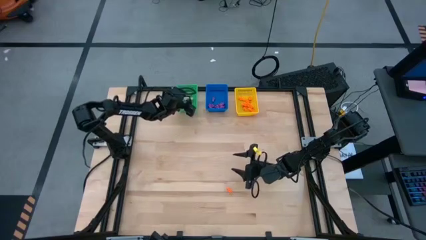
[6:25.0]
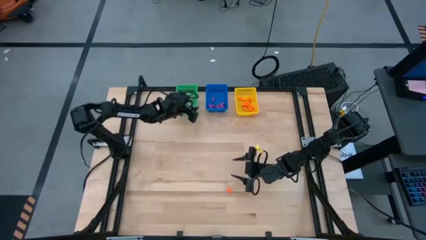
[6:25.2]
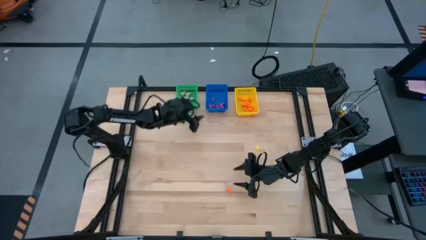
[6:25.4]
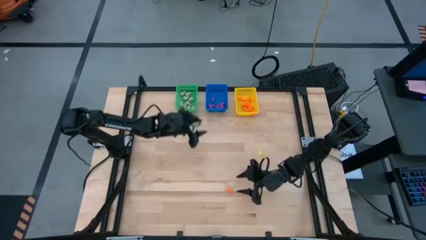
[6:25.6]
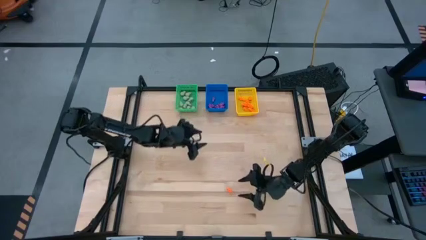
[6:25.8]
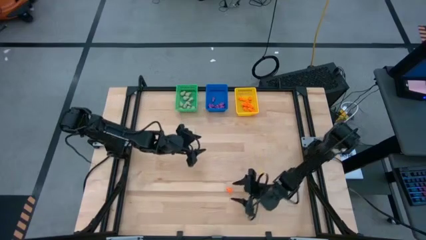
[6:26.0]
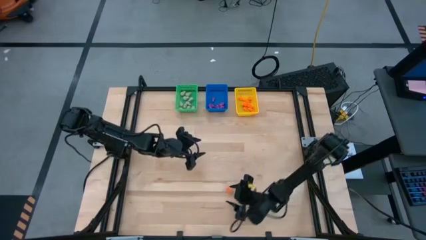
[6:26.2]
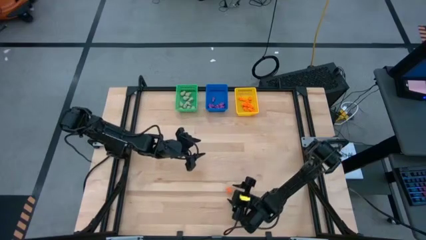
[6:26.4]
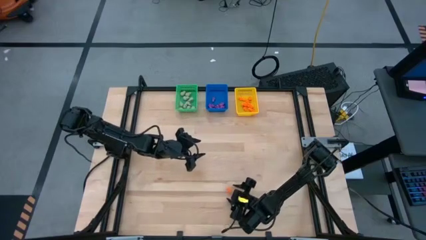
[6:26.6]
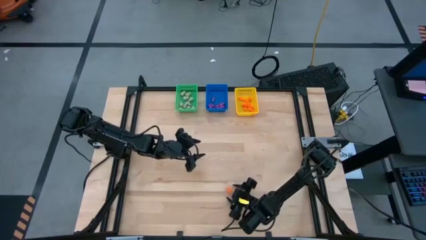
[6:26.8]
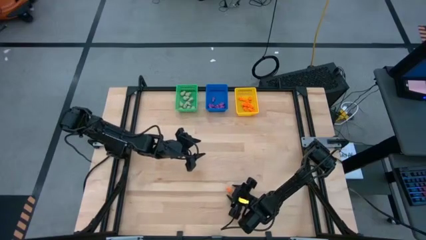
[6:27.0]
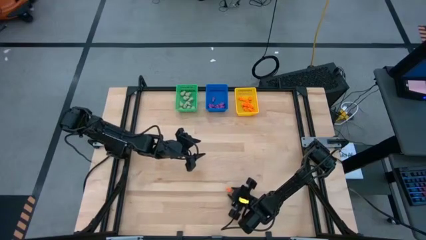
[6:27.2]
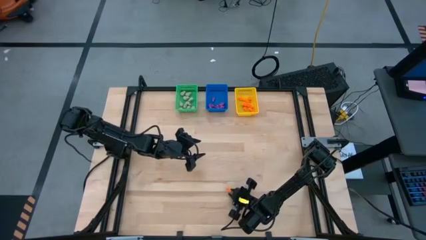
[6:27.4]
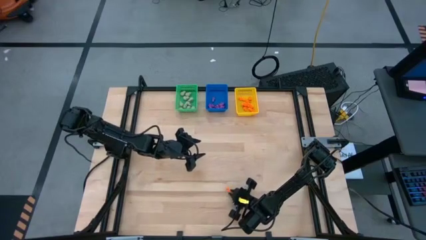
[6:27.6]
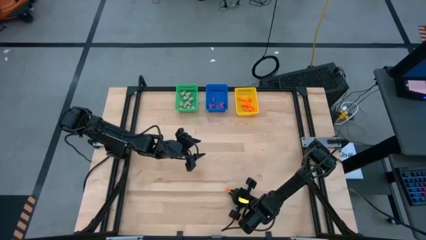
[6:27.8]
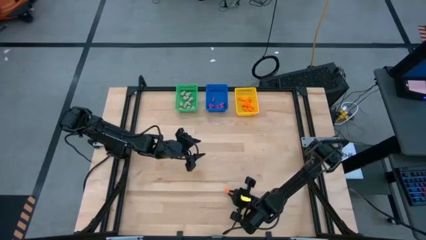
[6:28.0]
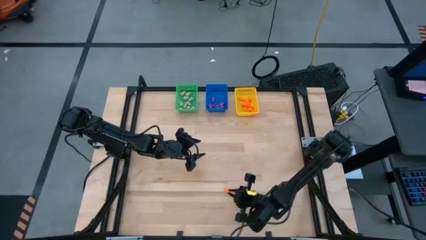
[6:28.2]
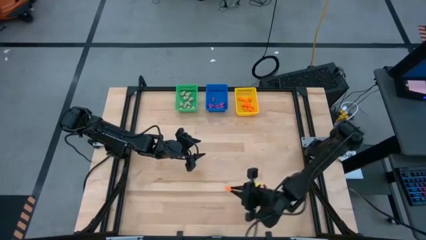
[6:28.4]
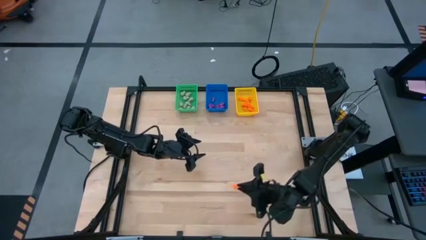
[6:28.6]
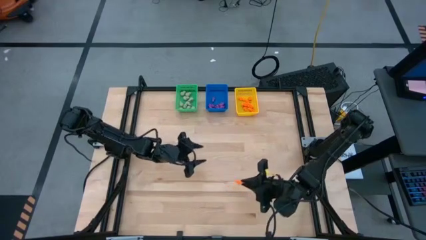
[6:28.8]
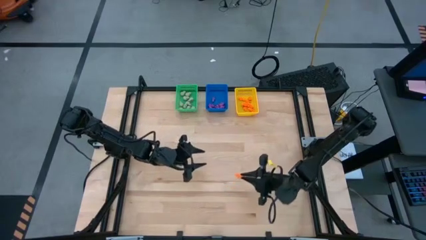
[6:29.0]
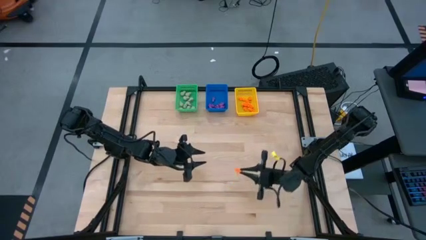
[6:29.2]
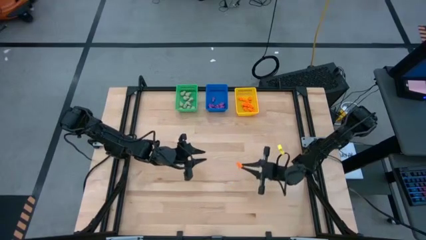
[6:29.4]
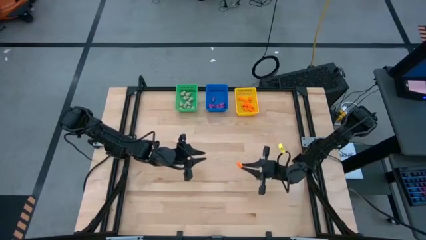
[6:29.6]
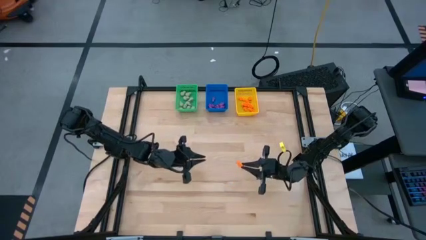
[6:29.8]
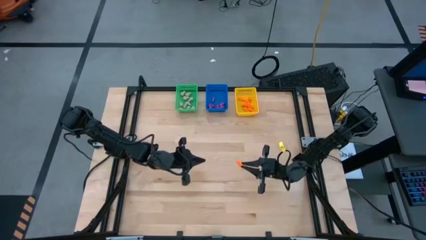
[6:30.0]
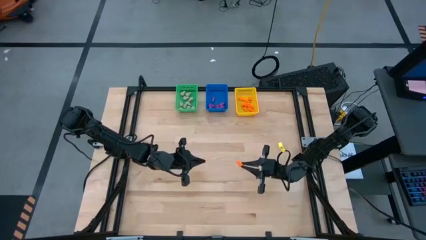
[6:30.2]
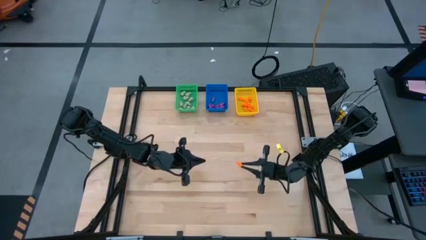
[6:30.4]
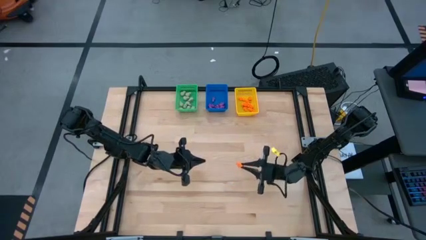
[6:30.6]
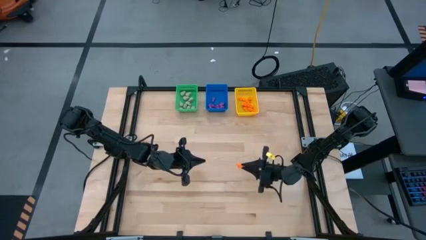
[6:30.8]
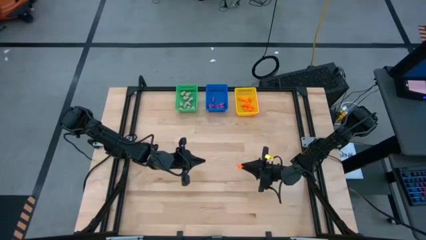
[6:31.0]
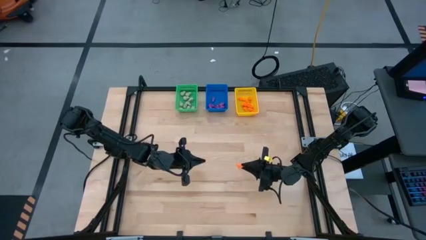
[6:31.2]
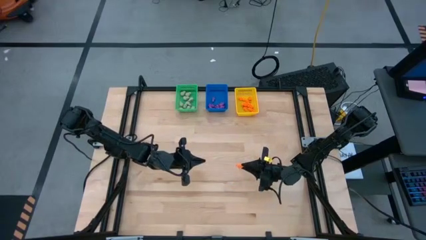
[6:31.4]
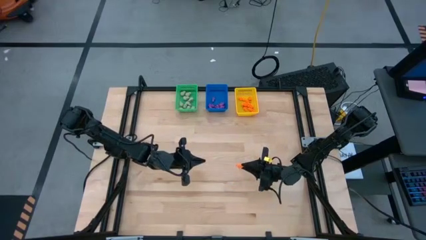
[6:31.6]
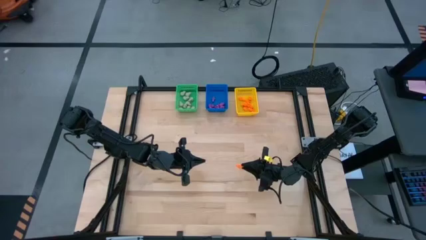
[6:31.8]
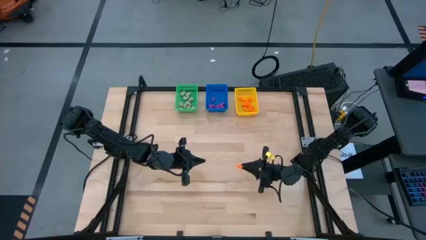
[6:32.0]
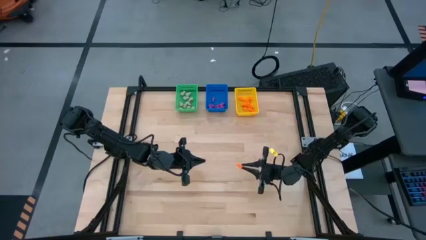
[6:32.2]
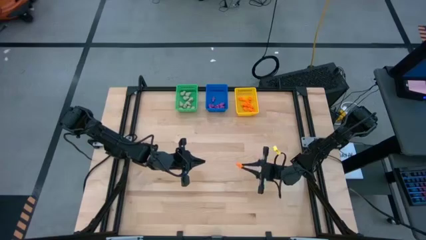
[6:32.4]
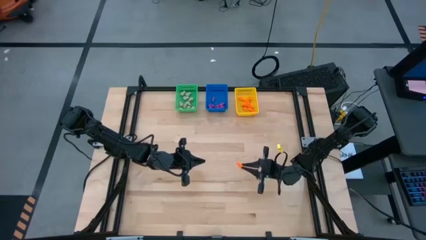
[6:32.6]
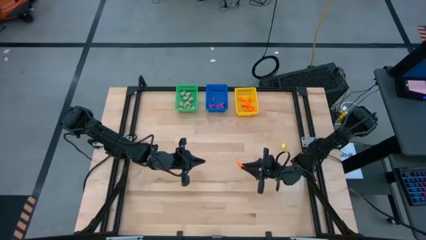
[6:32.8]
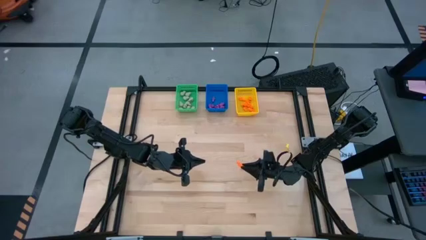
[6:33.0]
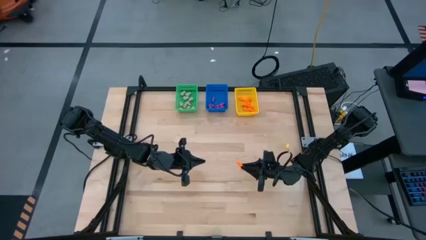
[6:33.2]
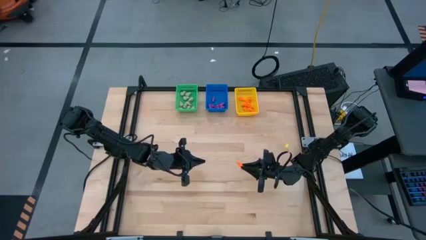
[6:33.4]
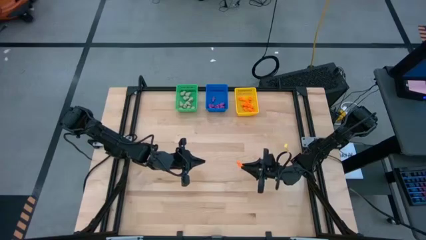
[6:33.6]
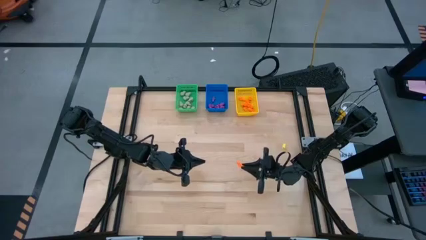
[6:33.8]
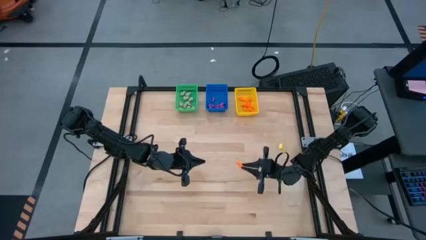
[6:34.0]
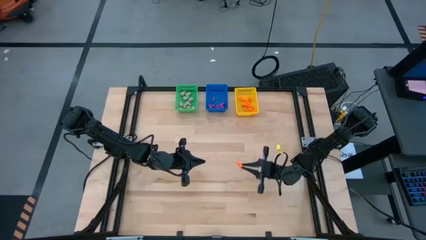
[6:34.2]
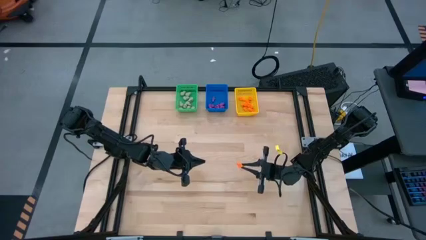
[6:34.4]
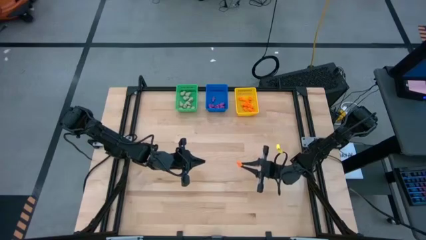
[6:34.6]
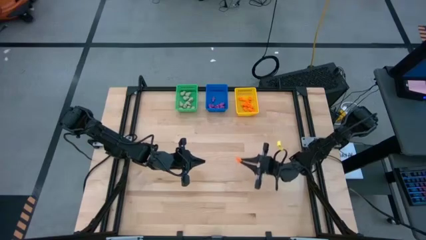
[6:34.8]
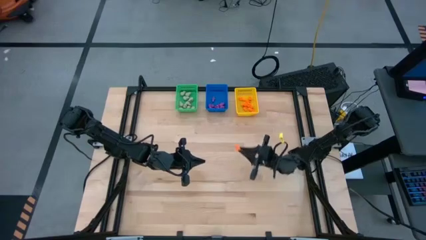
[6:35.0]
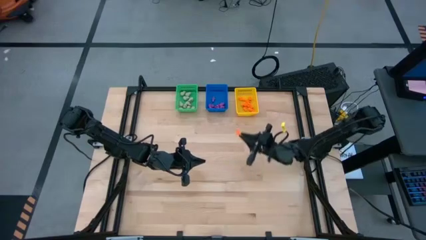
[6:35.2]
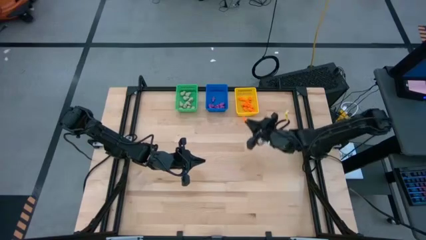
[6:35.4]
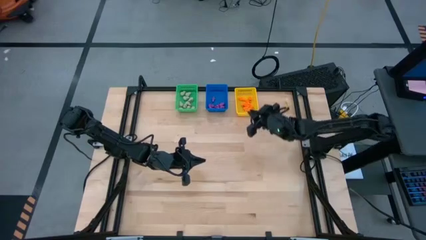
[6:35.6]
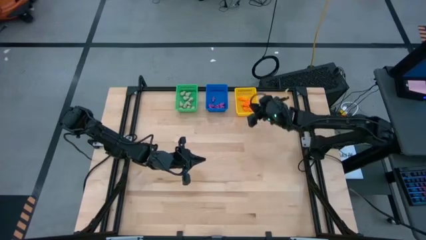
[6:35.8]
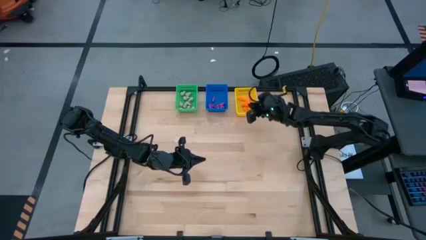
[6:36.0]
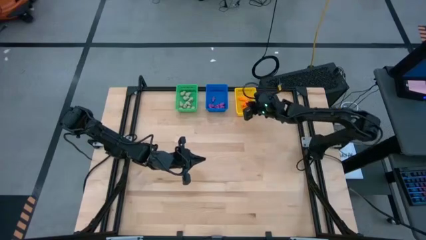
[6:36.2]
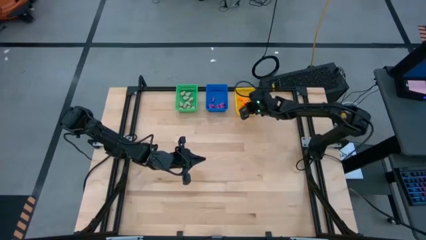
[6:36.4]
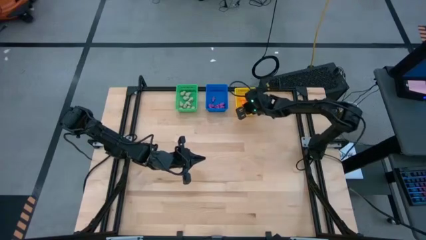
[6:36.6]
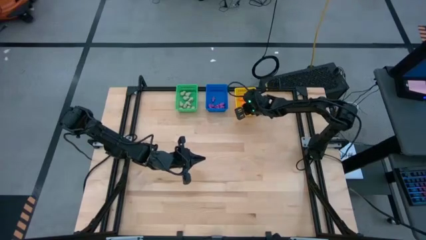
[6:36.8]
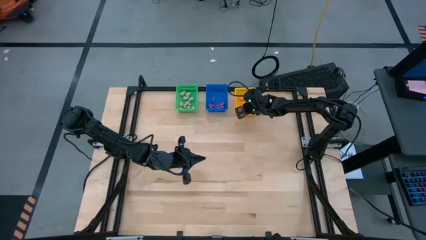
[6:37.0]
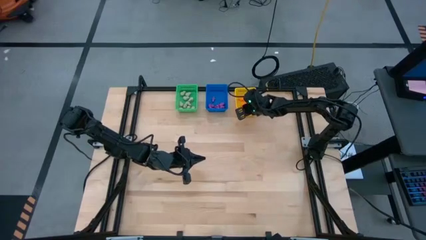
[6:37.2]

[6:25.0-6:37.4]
Task: Sort Halloween decoration
Put the orange skeleton toy into the yellow bin

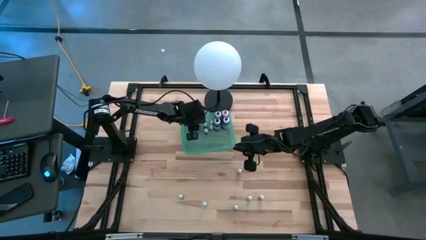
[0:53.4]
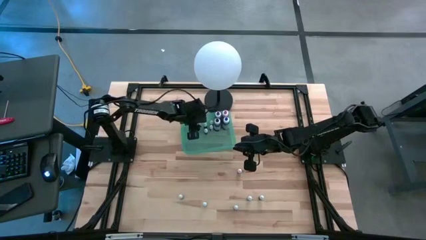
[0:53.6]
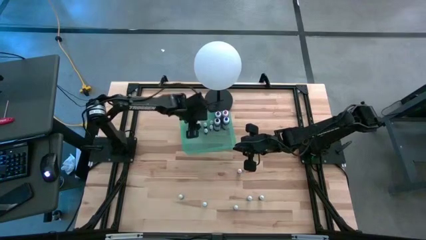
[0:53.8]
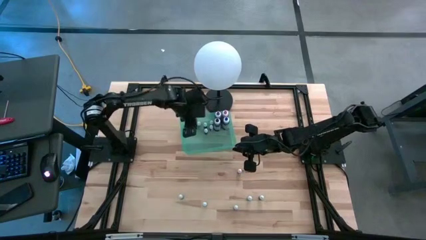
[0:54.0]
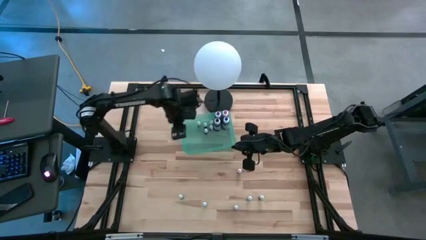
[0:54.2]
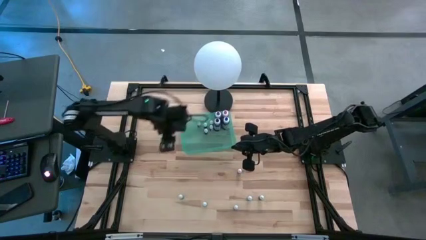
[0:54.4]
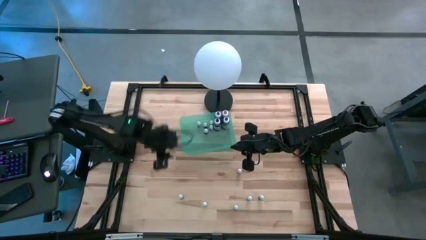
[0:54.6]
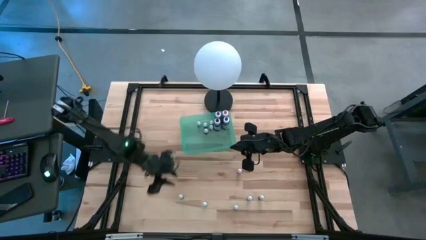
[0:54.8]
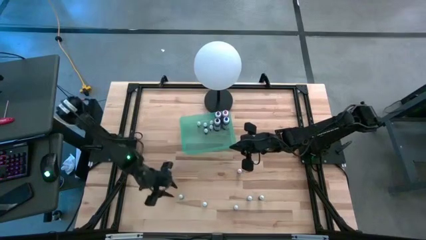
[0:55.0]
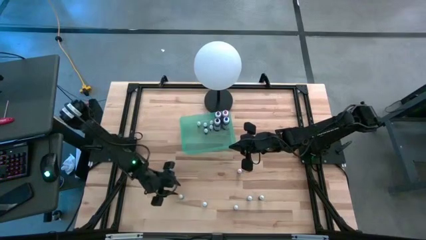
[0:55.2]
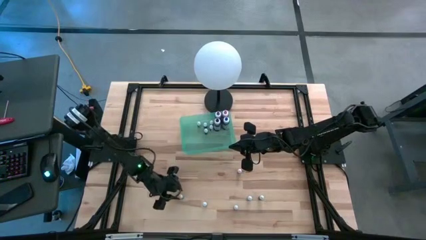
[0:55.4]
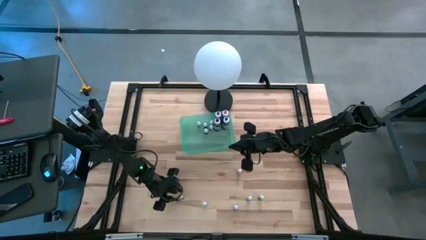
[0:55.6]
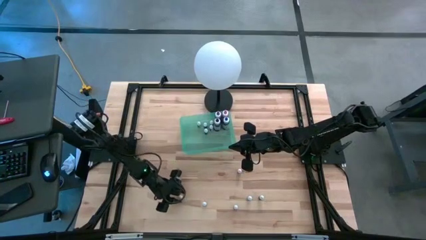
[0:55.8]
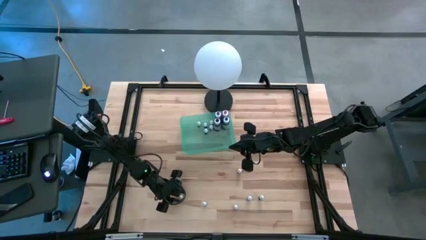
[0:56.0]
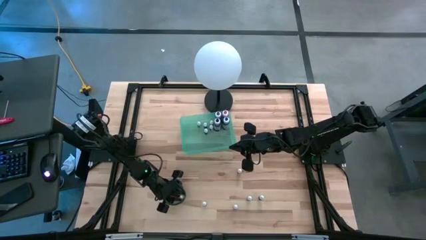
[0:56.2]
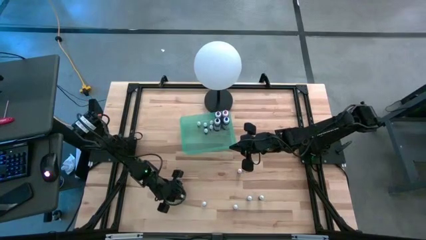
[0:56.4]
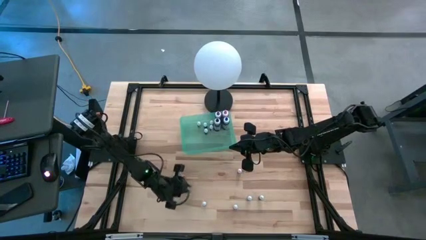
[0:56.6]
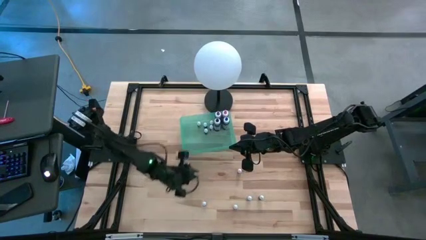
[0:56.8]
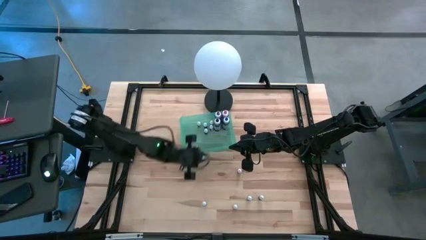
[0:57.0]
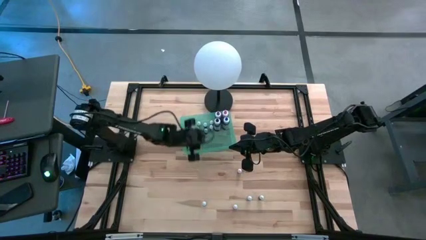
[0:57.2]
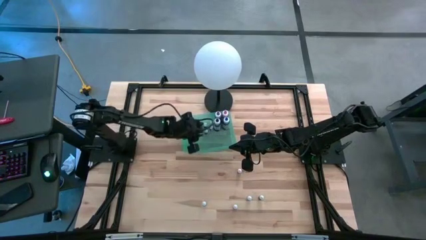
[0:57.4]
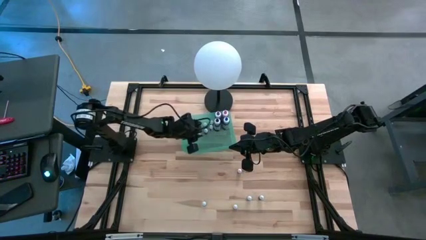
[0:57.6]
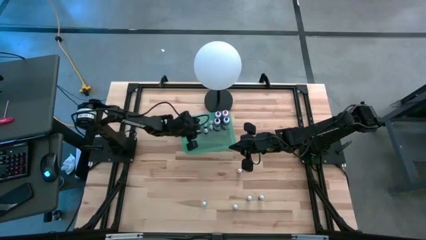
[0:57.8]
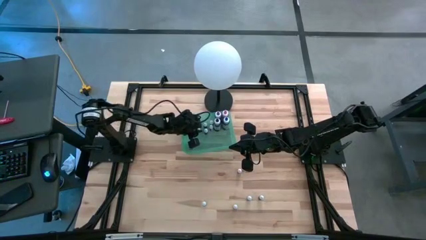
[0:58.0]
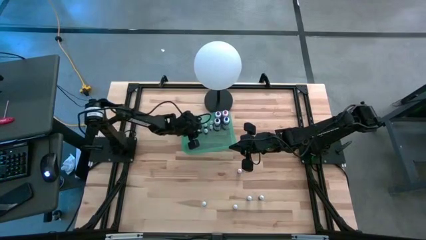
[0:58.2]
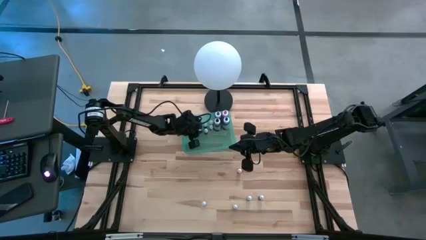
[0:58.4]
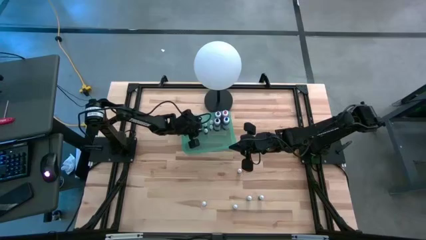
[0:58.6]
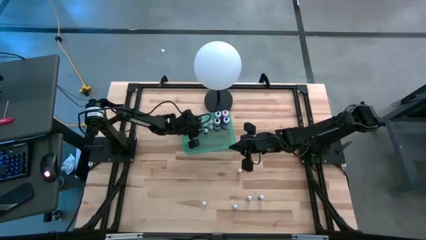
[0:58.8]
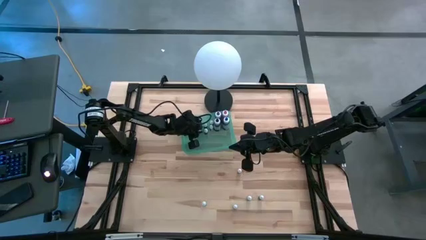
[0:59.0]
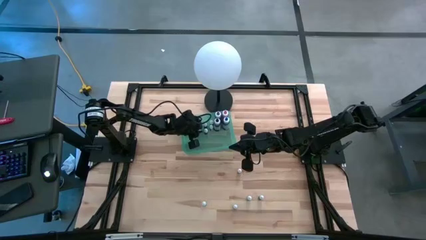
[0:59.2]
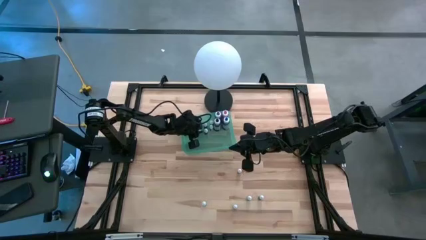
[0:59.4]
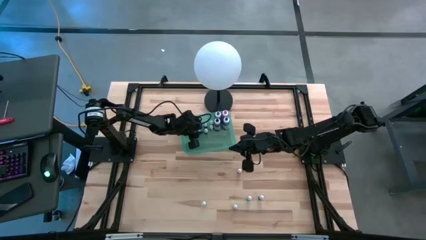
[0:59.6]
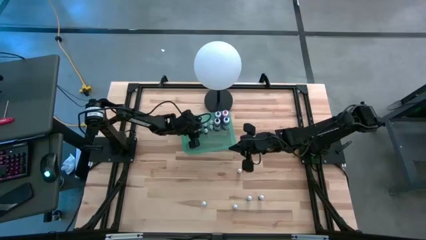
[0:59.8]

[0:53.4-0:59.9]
Task: Pick & Place food coloring
Put the small blue food coloring bottle into the green bin
